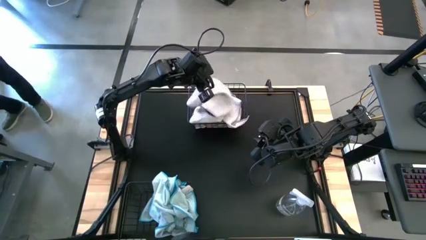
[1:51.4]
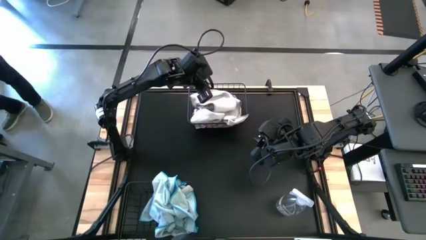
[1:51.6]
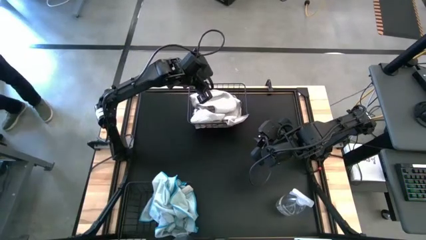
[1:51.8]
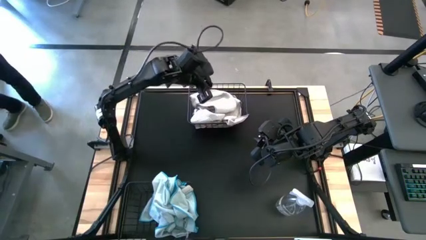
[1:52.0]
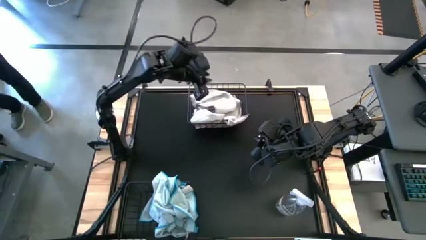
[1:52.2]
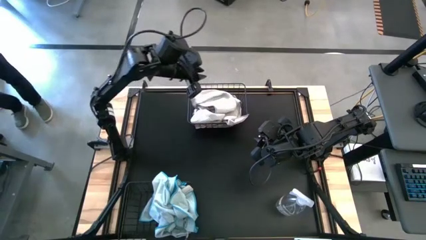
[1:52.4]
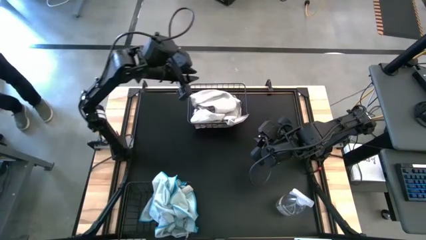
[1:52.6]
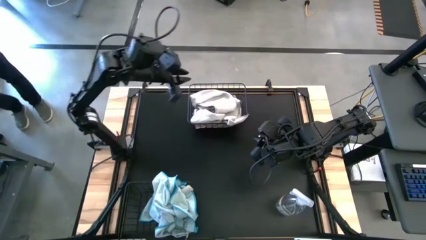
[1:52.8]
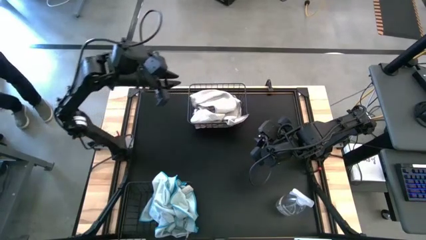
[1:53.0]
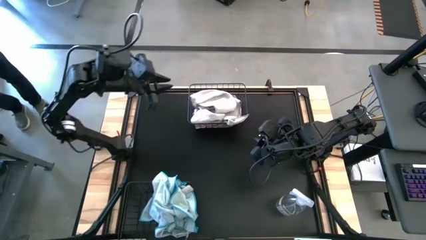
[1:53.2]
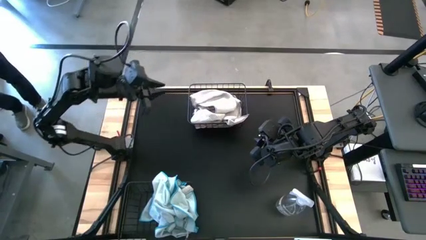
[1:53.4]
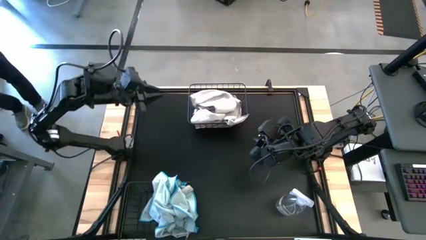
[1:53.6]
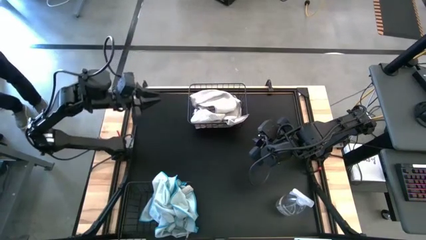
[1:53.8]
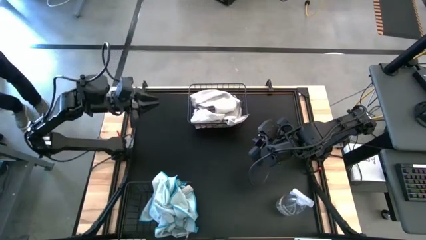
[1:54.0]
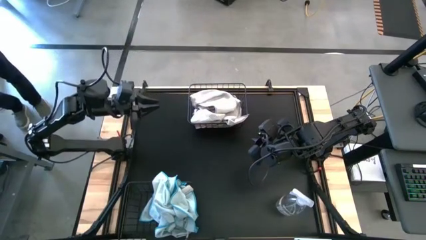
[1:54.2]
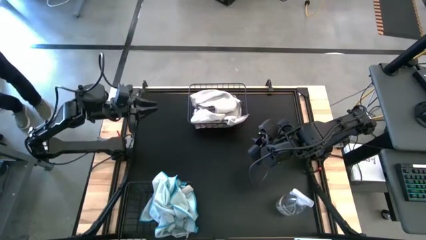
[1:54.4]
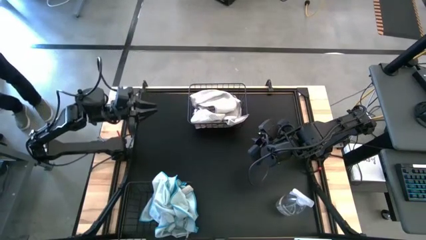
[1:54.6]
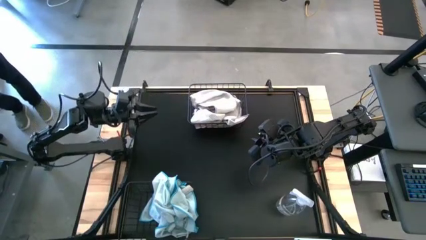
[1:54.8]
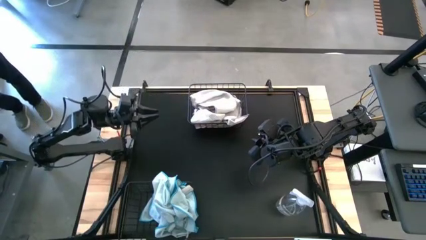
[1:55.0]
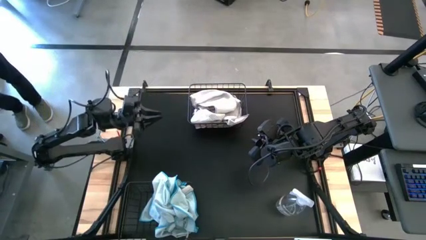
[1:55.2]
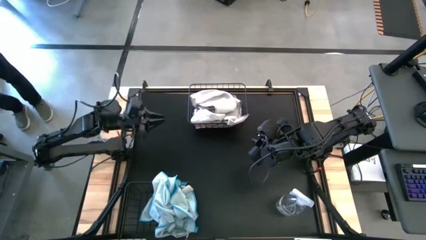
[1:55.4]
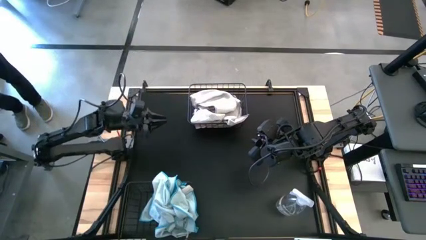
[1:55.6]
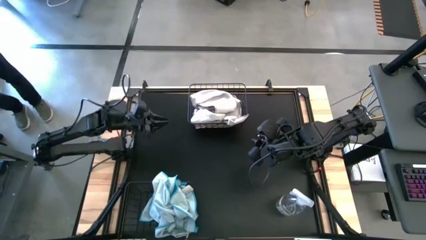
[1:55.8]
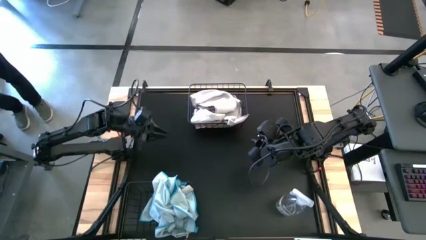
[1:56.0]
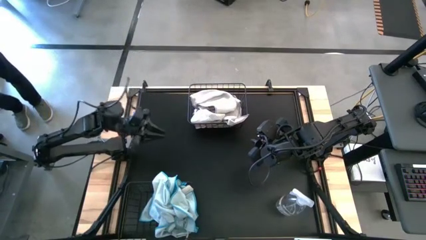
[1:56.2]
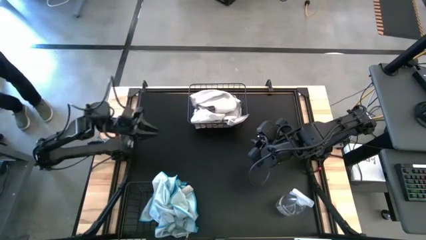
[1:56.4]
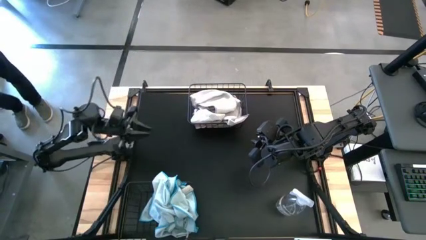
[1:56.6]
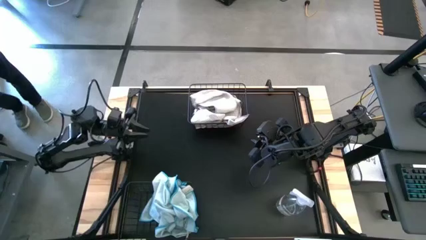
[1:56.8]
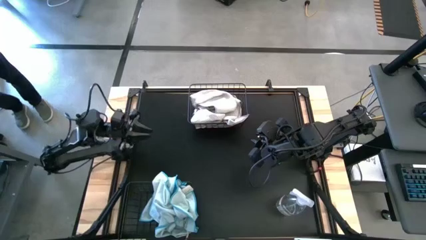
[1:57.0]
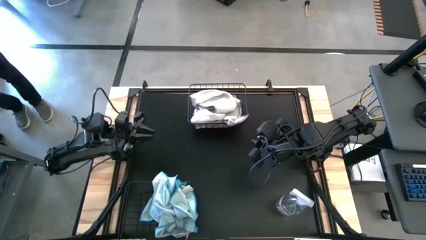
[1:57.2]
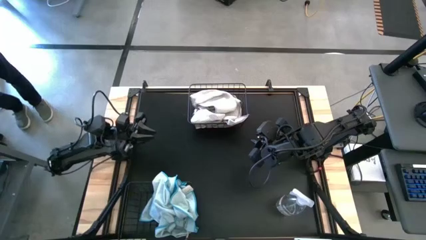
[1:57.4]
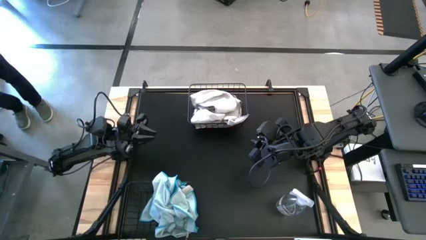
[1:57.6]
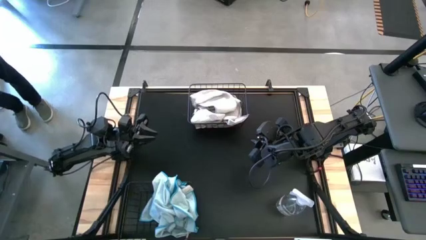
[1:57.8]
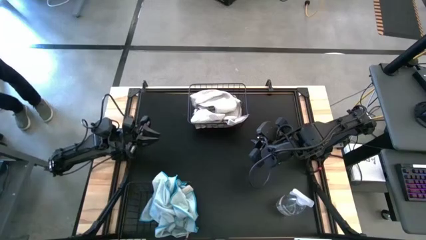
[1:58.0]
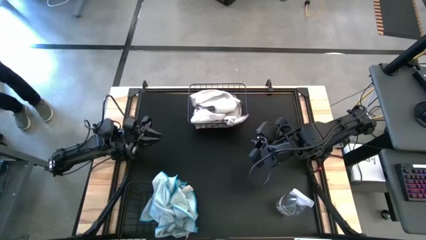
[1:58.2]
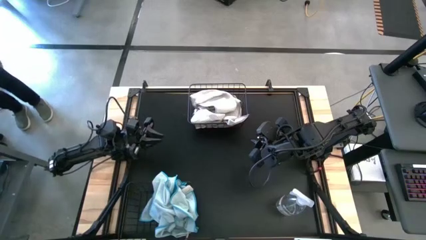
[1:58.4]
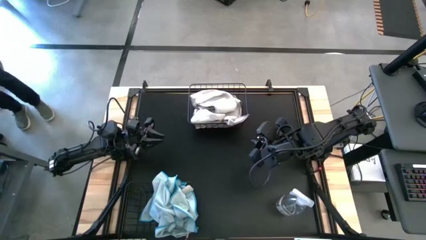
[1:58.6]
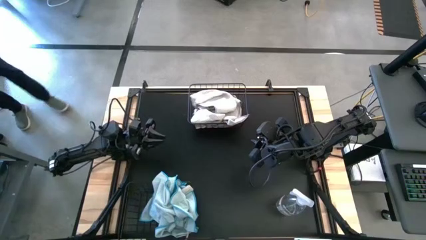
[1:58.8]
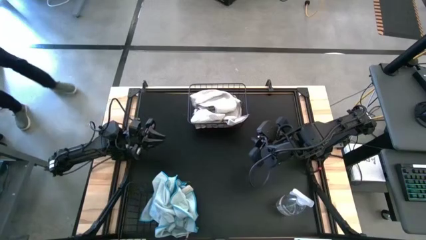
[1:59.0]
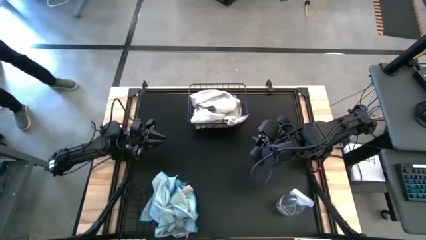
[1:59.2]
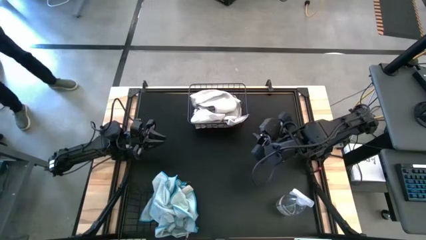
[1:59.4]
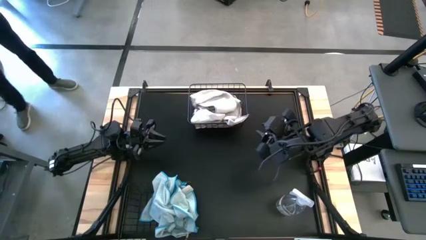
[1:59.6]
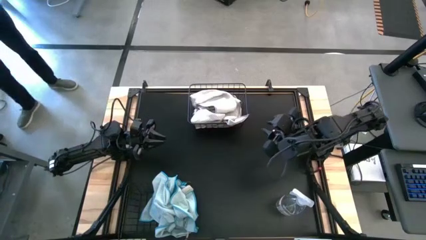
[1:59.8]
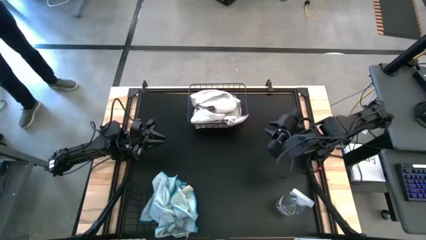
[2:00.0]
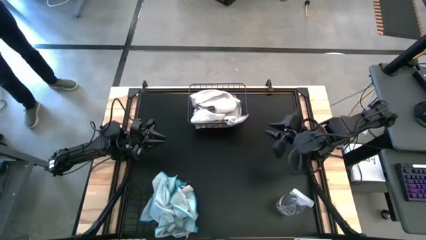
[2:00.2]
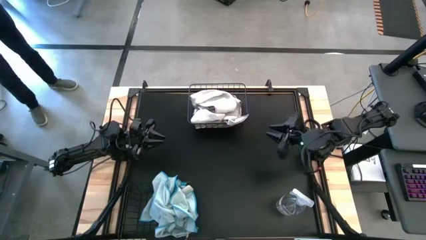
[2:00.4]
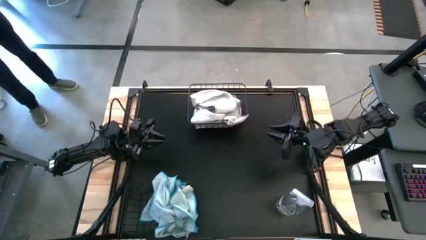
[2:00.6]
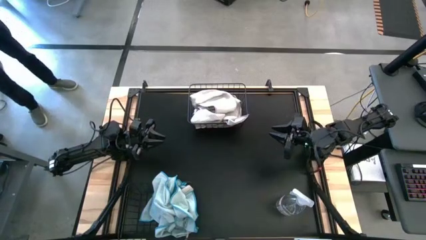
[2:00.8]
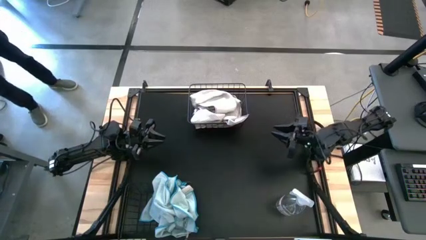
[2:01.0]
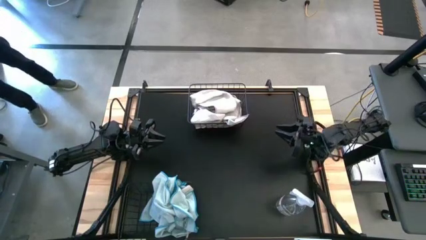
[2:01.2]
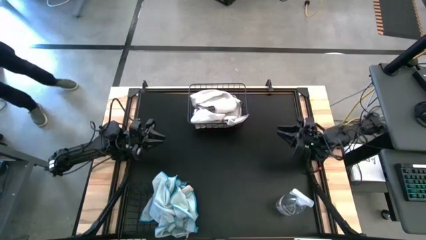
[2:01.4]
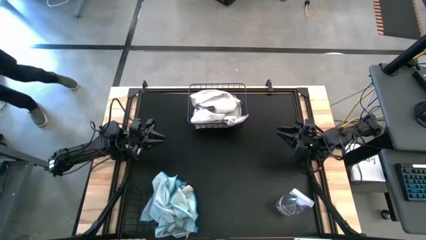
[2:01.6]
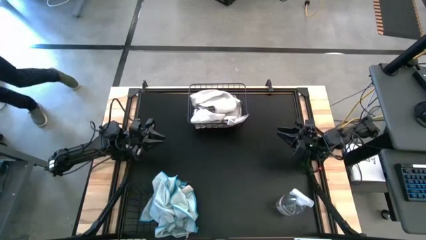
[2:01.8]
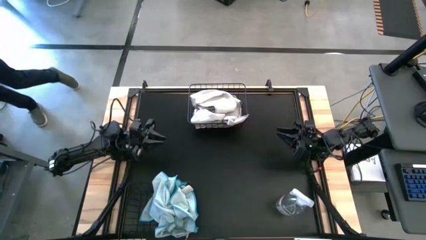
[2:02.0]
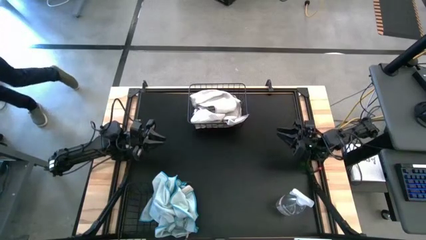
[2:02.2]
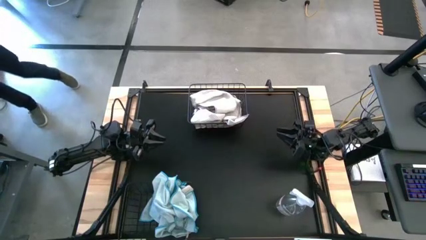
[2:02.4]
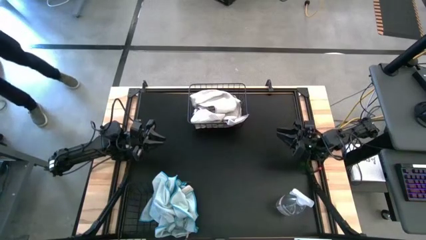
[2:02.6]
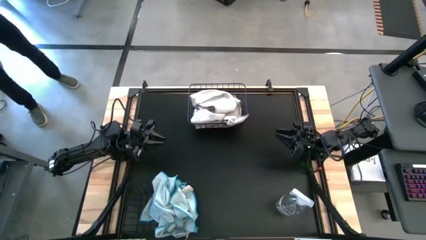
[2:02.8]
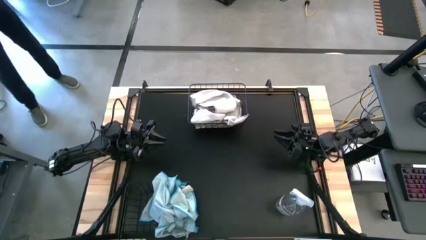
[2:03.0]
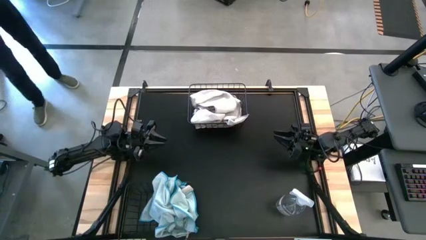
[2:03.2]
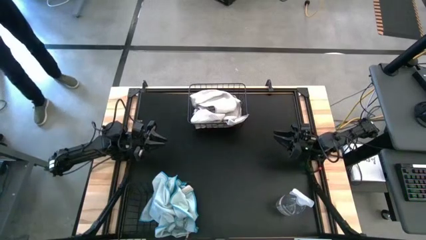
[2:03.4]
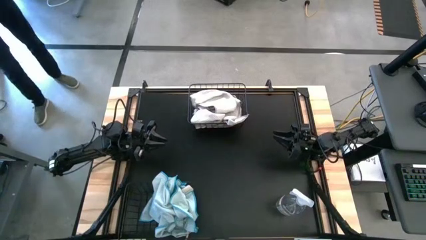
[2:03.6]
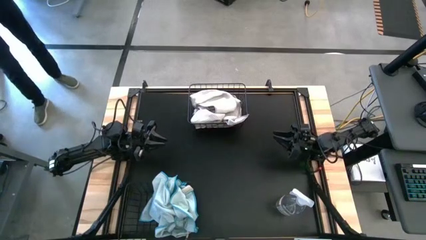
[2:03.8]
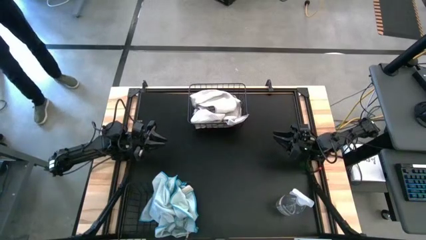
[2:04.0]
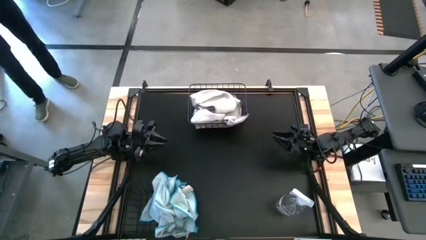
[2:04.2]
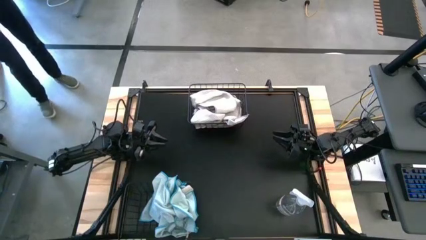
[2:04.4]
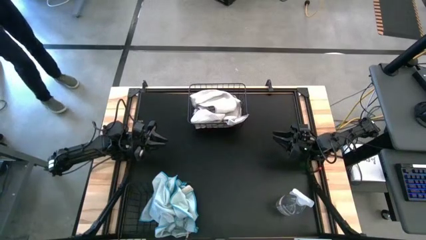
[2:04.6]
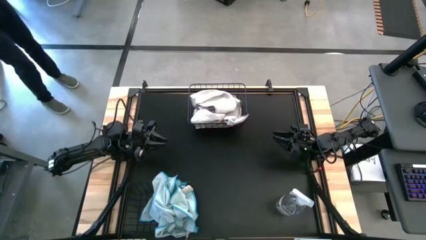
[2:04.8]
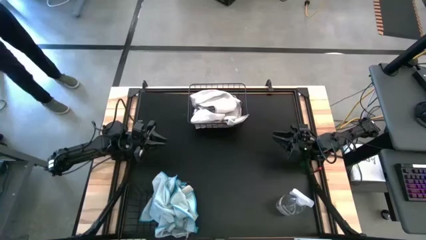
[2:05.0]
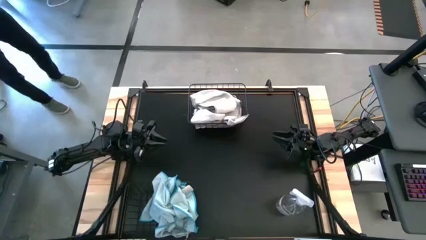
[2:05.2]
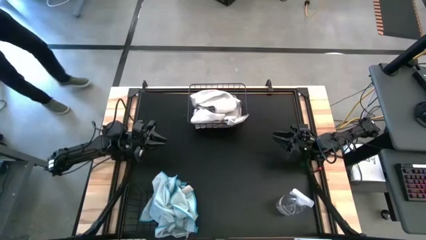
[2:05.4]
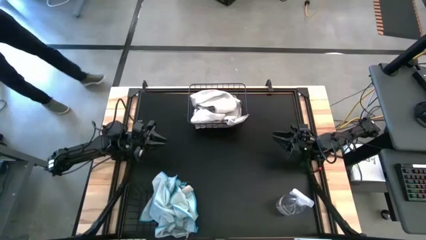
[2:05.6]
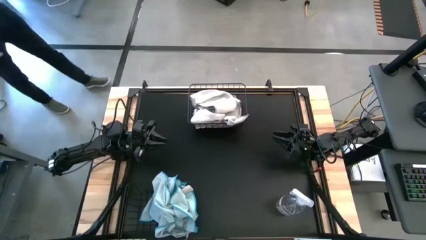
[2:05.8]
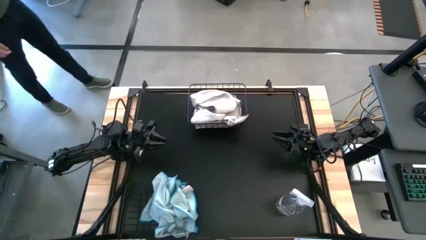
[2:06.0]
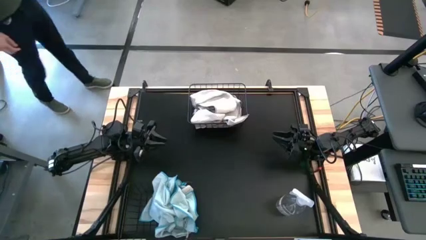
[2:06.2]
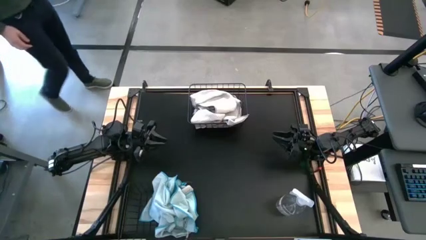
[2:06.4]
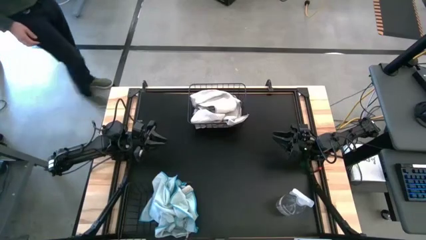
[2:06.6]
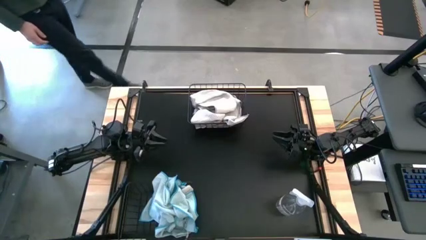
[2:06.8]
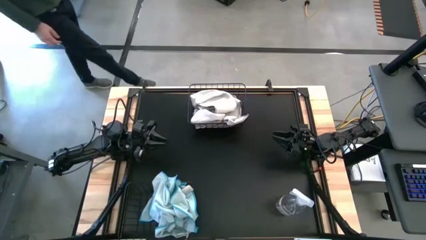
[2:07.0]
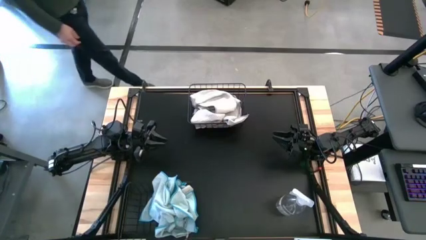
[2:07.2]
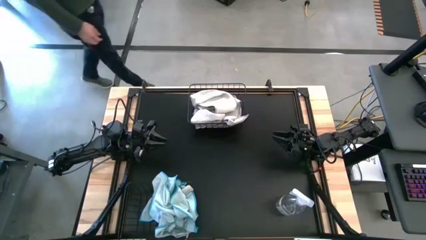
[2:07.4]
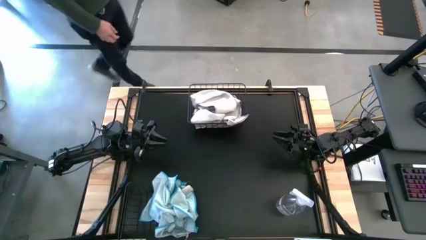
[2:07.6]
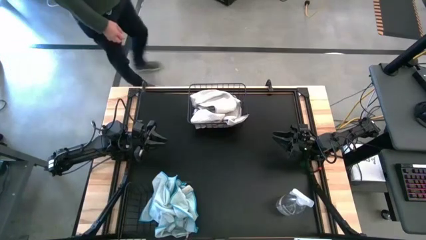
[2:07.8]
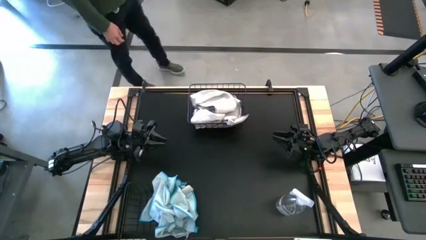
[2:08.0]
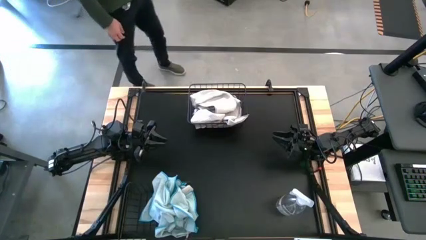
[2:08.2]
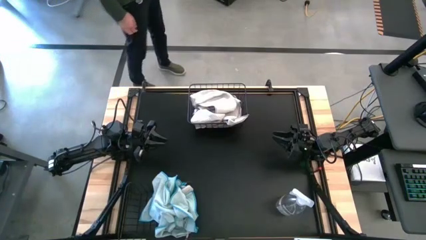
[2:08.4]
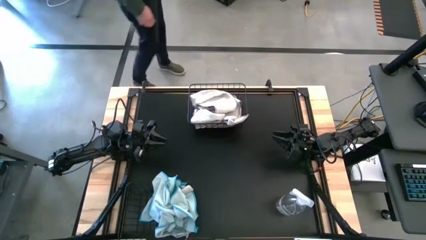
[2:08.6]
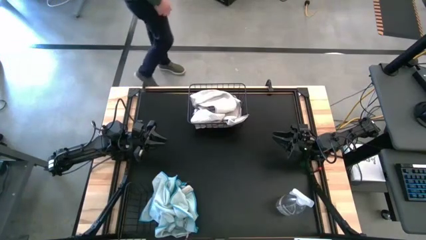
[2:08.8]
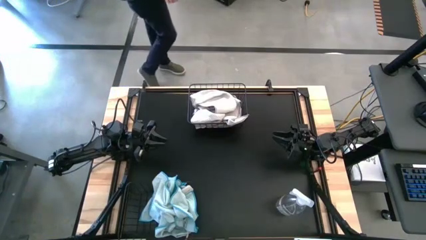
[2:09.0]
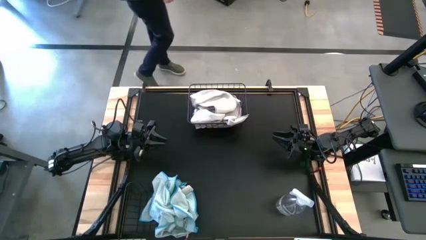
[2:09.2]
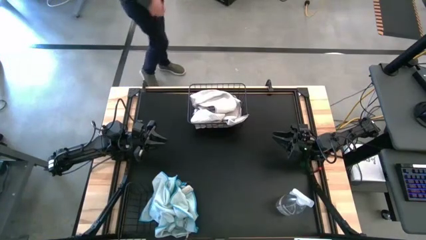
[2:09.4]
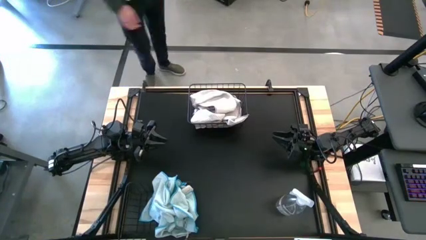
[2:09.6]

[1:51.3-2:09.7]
Task: Sort microfiber towel by color & place in baskets
Return to Home Position
